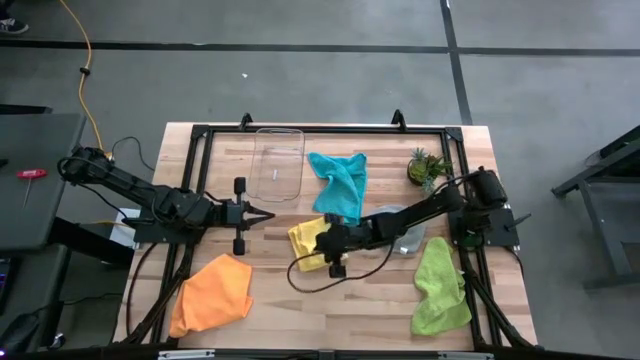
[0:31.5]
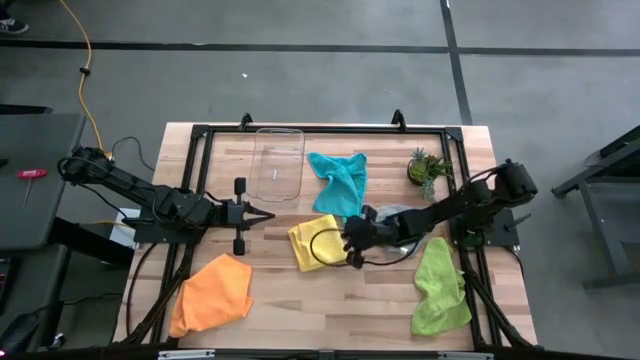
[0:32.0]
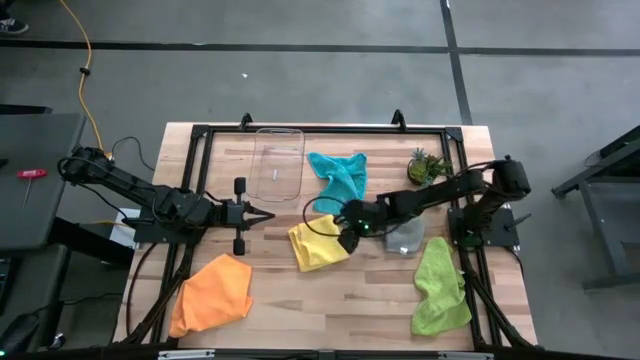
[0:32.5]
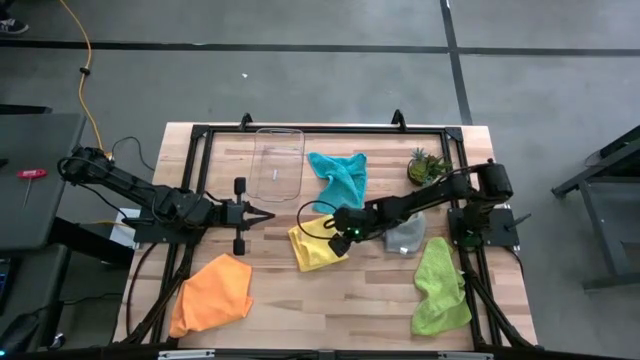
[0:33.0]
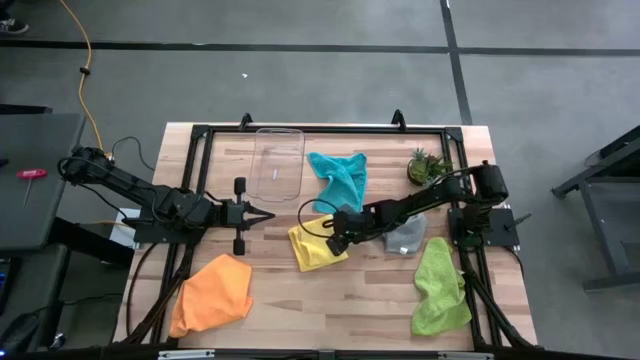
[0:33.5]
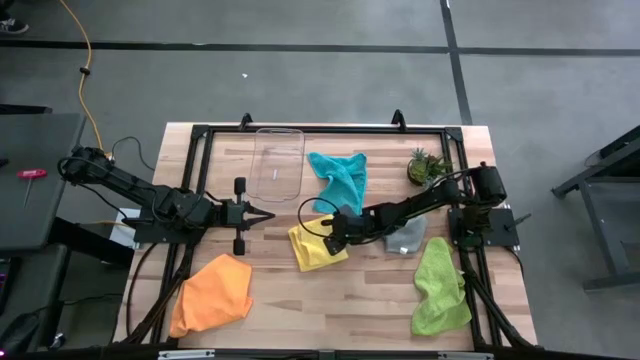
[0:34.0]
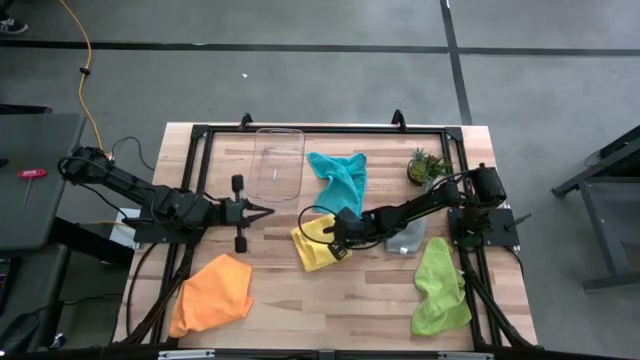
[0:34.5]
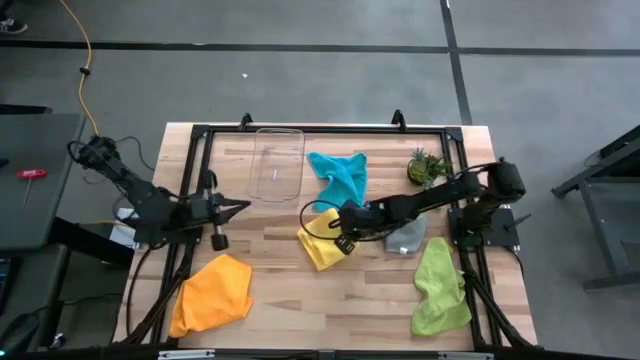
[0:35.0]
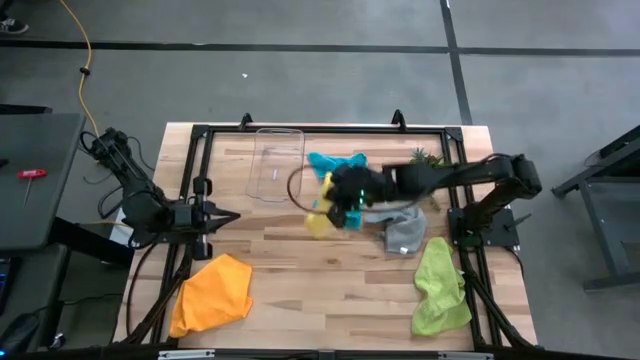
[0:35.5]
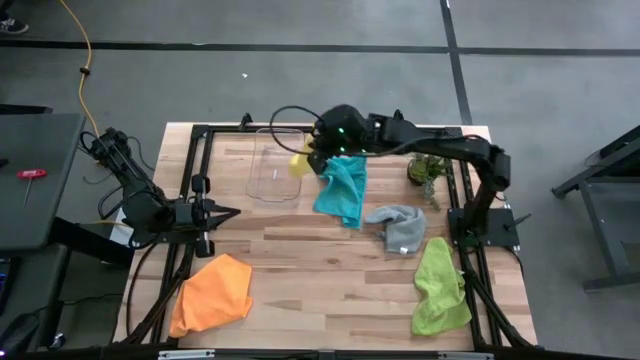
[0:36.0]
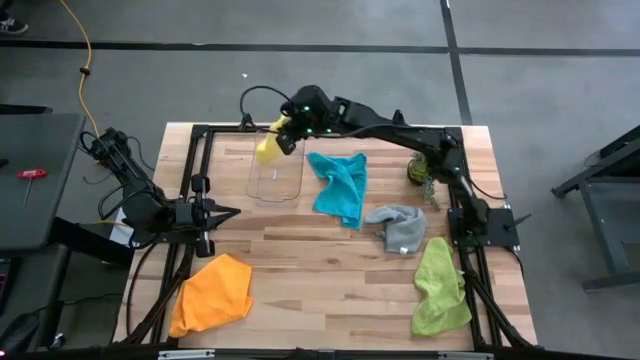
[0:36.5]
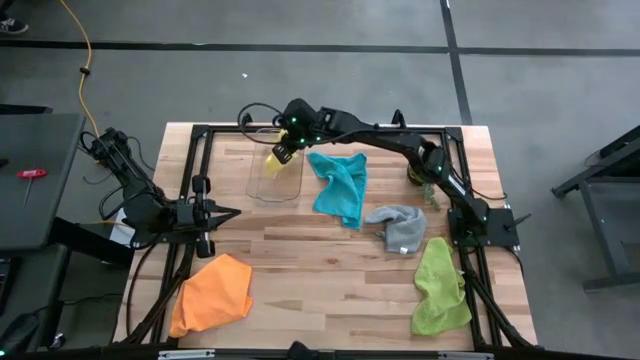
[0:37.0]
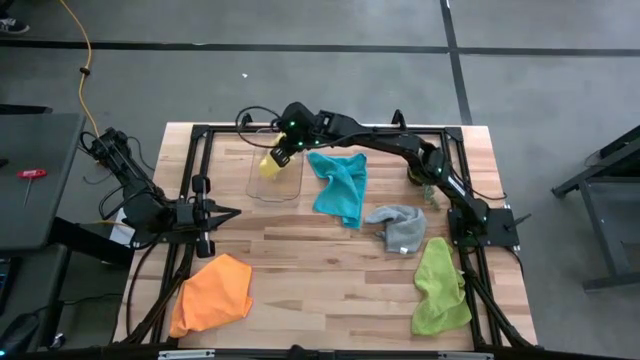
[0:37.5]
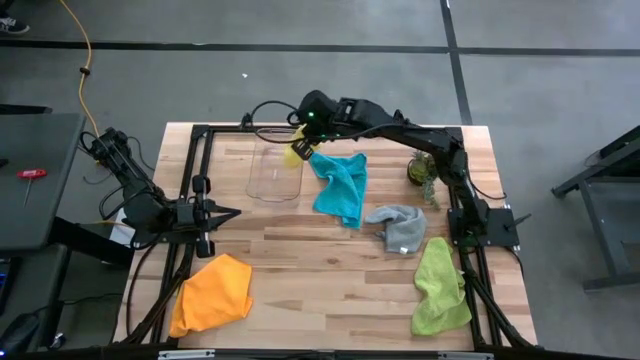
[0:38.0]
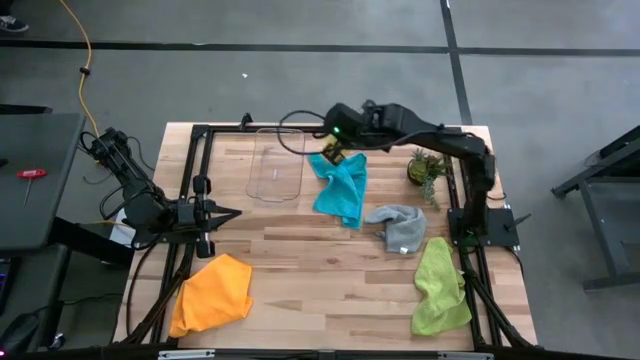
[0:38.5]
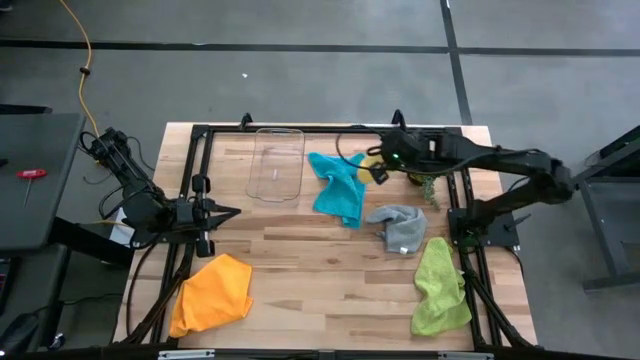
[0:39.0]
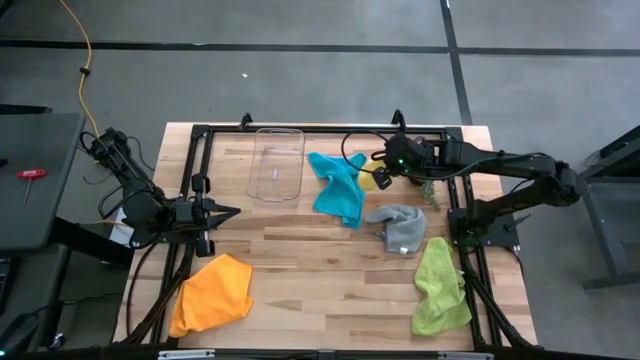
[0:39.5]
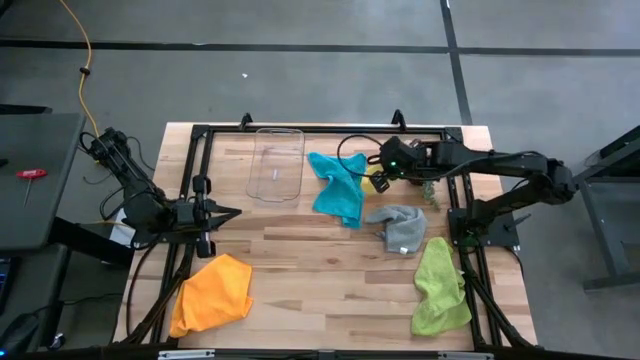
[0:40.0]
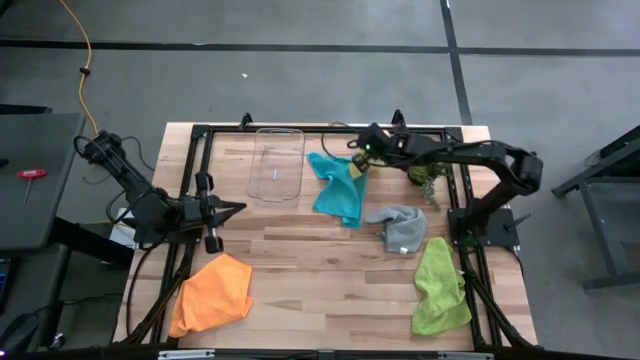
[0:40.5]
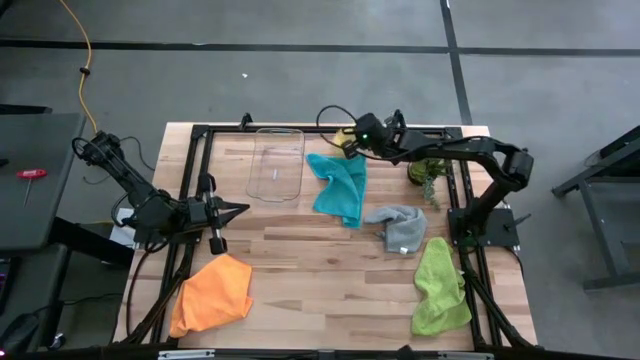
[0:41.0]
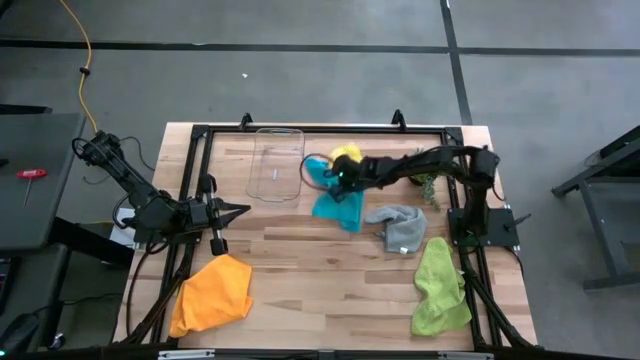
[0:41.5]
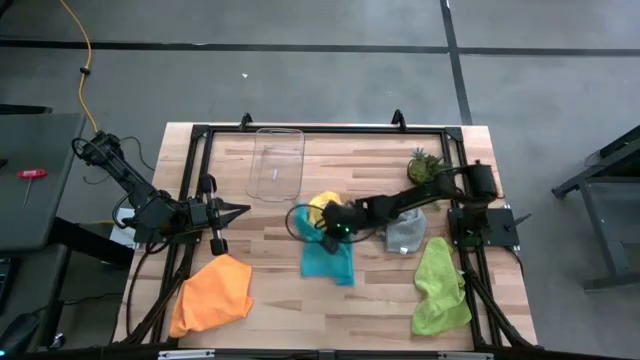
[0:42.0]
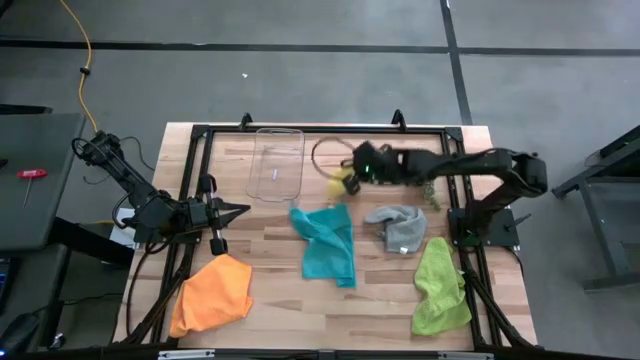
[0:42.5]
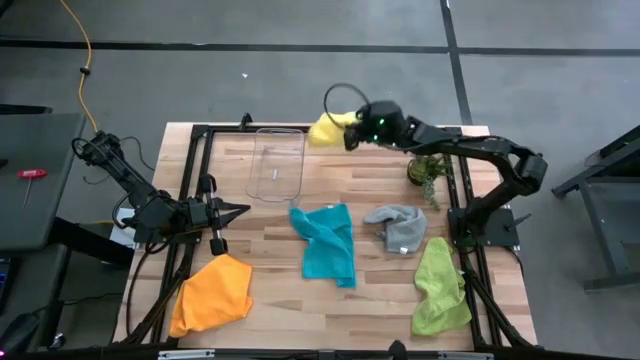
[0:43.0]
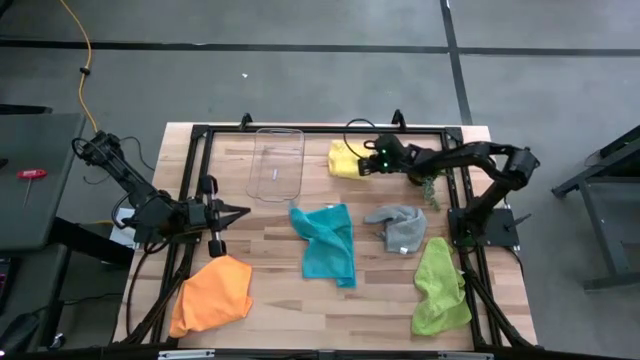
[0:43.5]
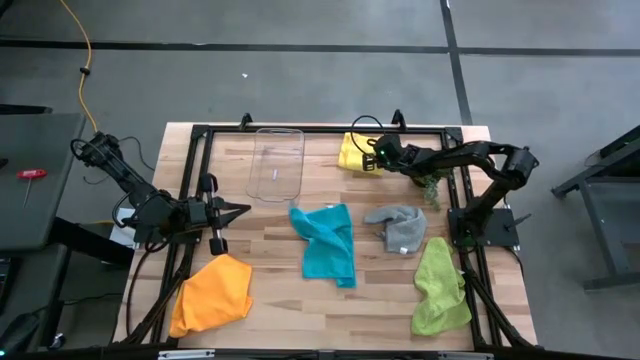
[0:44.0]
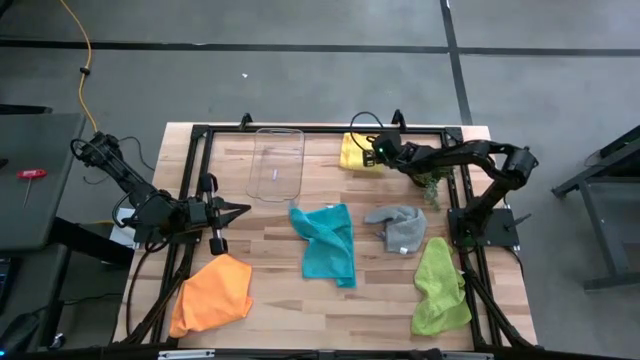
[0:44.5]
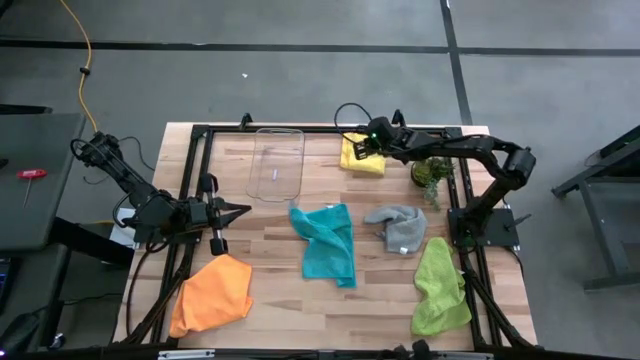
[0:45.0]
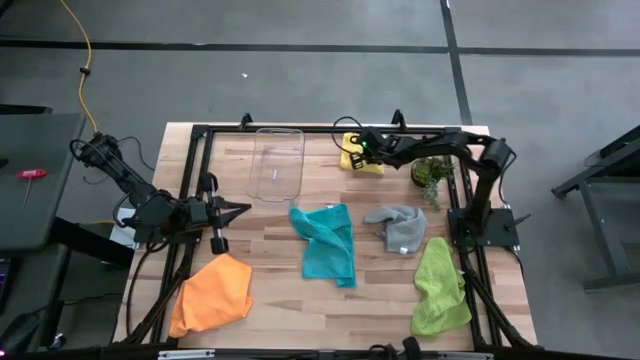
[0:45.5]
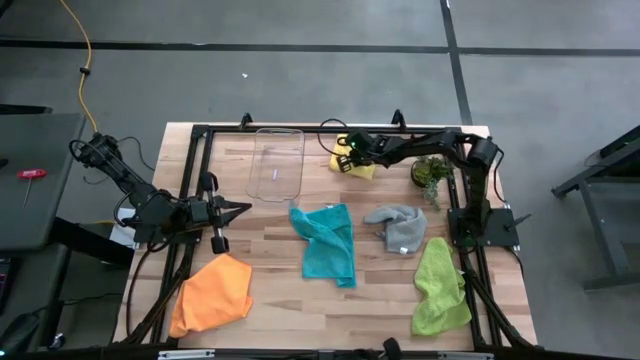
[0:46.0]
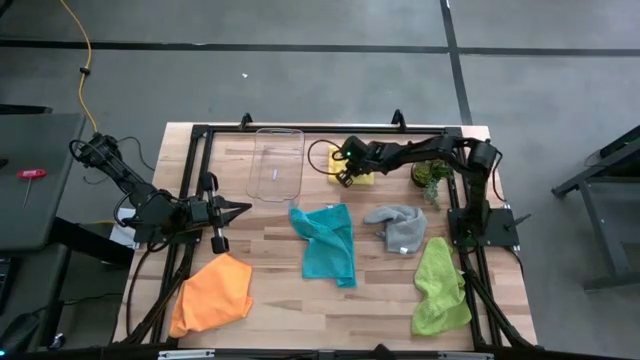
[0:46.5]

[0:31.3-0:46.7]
Task: Fold microfiber towels
Move the folded yellow microfiber cloth to the top middle of the table
